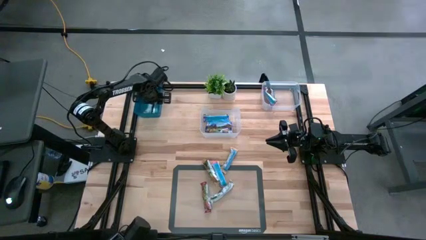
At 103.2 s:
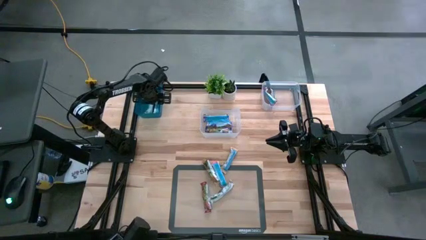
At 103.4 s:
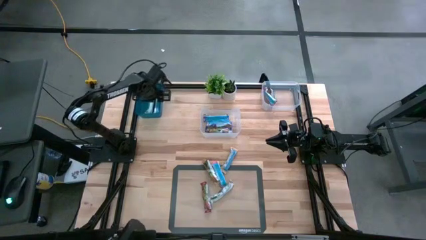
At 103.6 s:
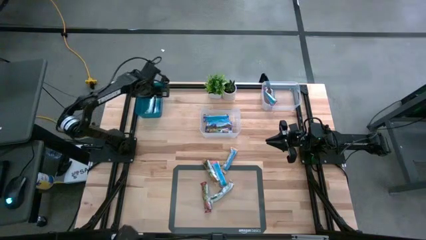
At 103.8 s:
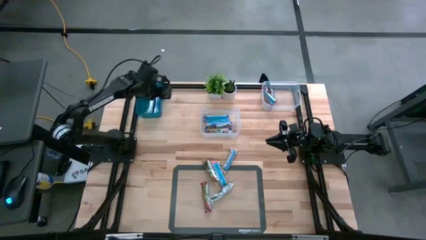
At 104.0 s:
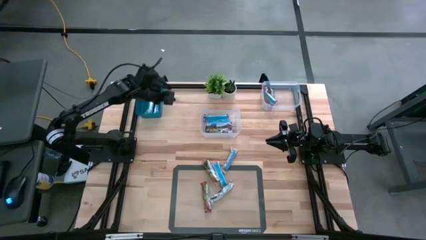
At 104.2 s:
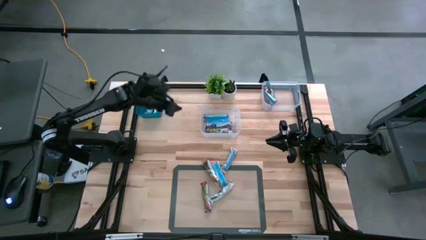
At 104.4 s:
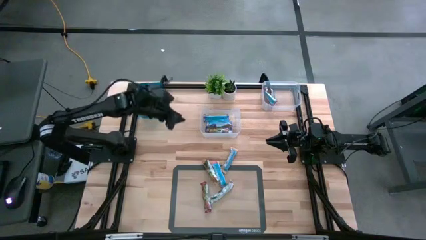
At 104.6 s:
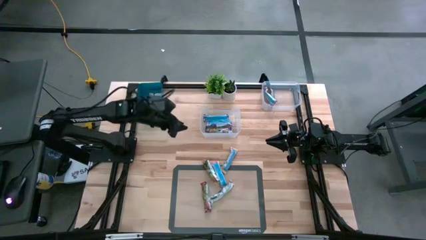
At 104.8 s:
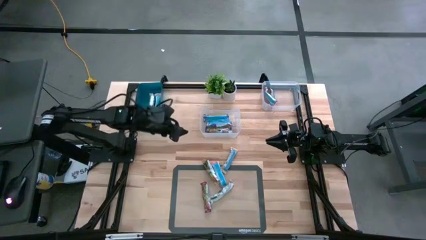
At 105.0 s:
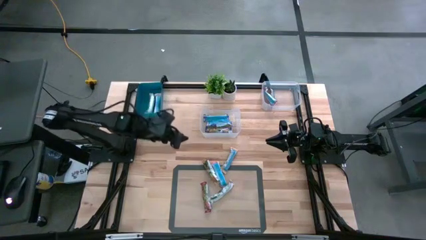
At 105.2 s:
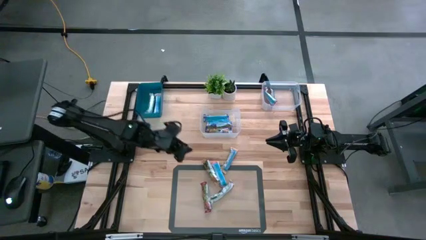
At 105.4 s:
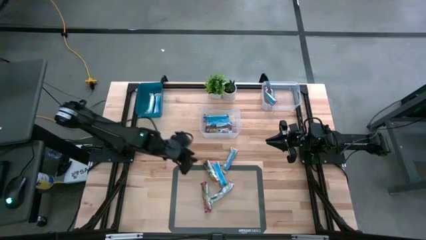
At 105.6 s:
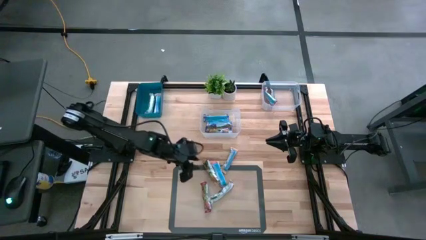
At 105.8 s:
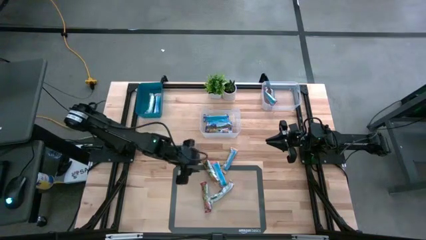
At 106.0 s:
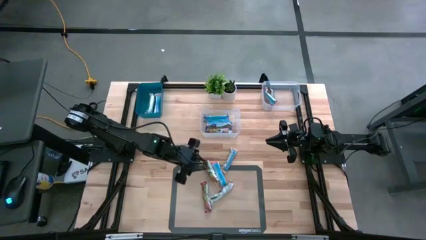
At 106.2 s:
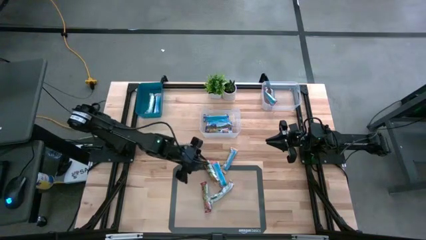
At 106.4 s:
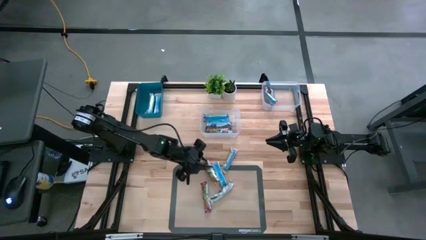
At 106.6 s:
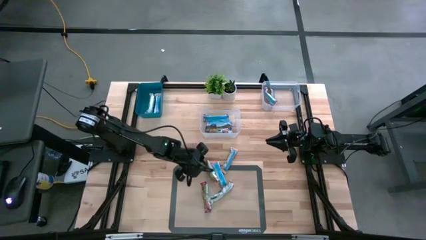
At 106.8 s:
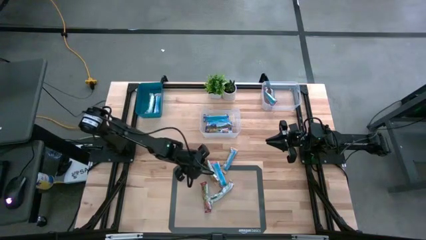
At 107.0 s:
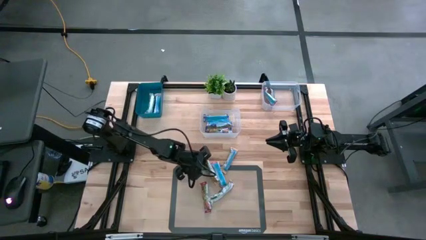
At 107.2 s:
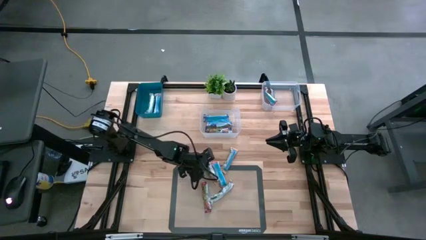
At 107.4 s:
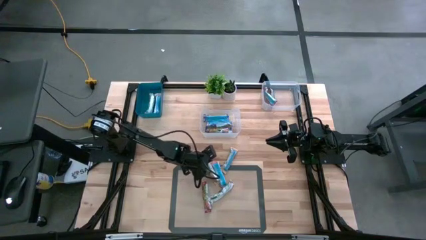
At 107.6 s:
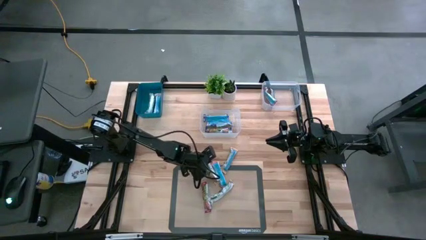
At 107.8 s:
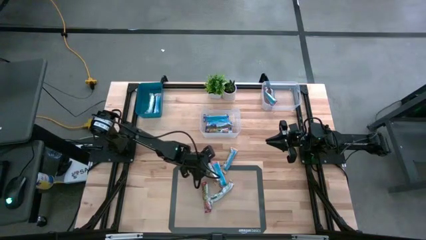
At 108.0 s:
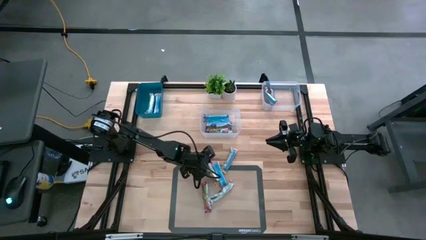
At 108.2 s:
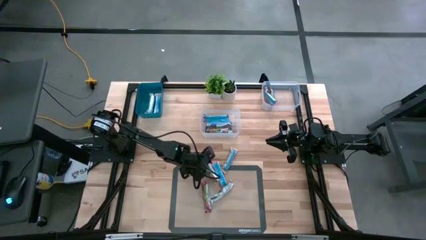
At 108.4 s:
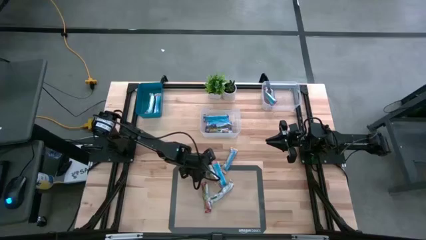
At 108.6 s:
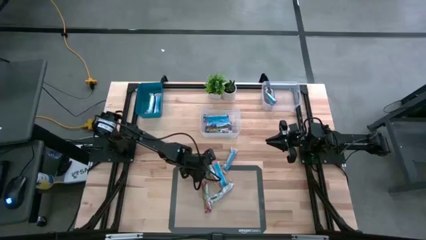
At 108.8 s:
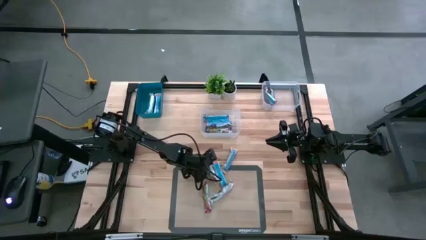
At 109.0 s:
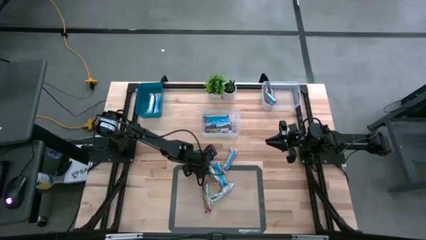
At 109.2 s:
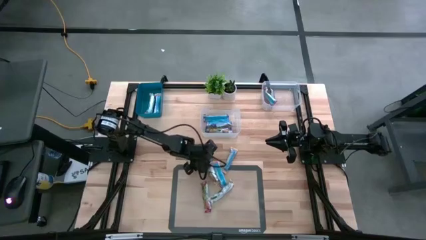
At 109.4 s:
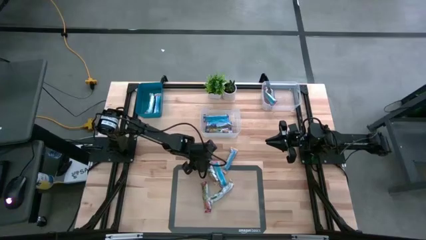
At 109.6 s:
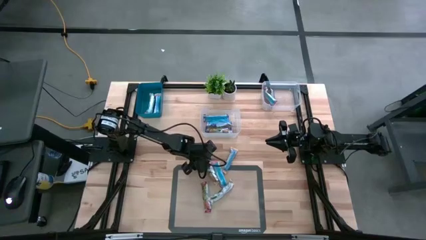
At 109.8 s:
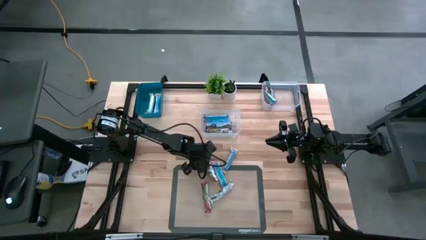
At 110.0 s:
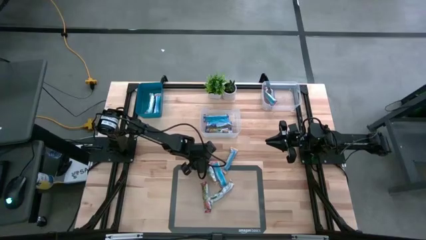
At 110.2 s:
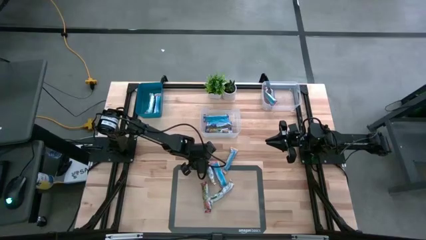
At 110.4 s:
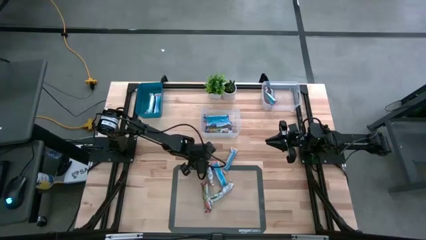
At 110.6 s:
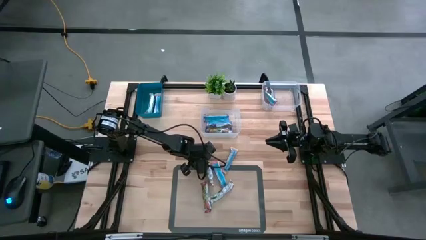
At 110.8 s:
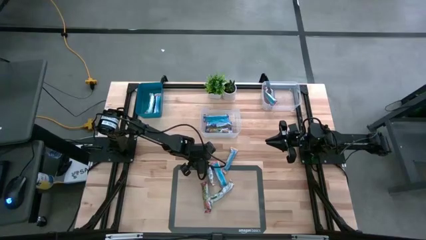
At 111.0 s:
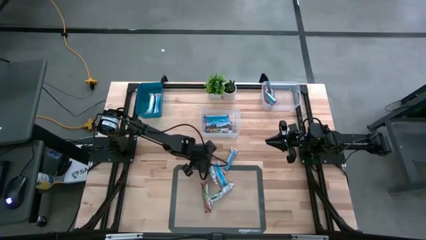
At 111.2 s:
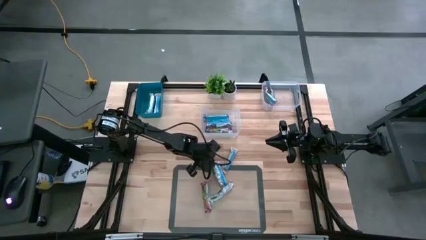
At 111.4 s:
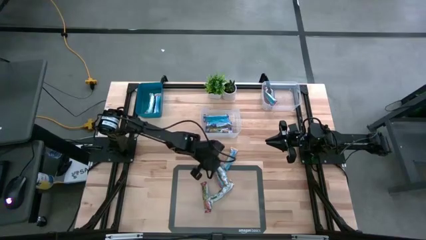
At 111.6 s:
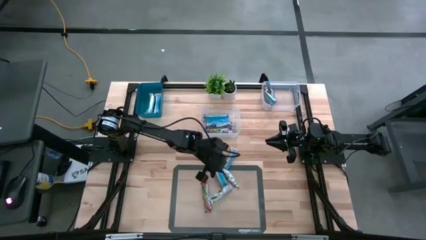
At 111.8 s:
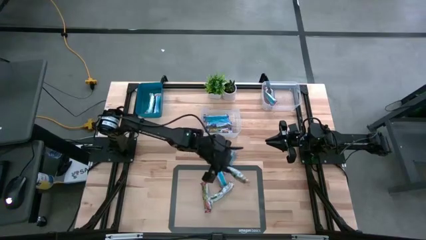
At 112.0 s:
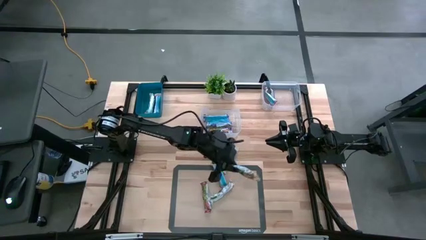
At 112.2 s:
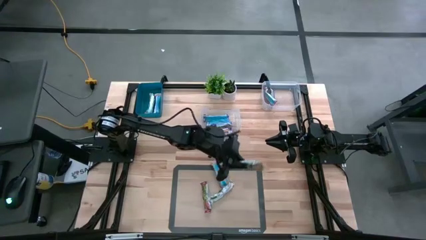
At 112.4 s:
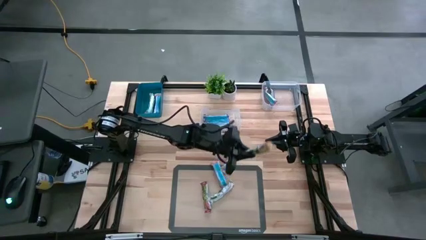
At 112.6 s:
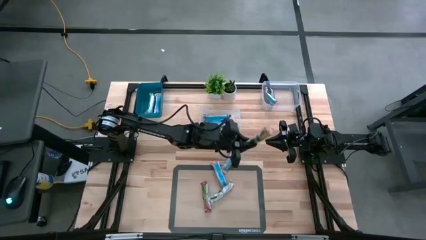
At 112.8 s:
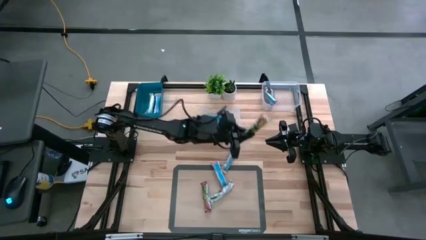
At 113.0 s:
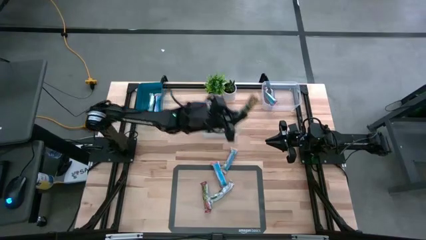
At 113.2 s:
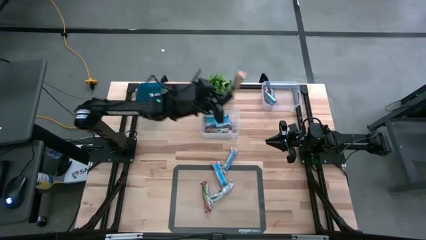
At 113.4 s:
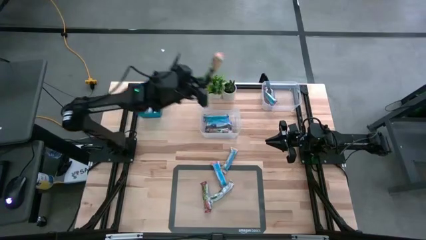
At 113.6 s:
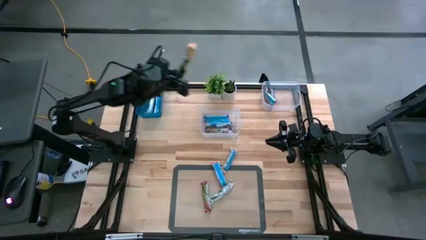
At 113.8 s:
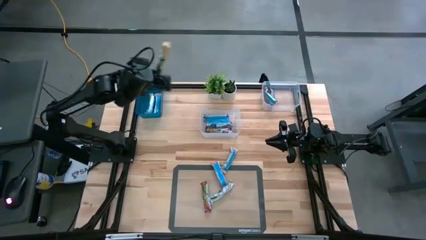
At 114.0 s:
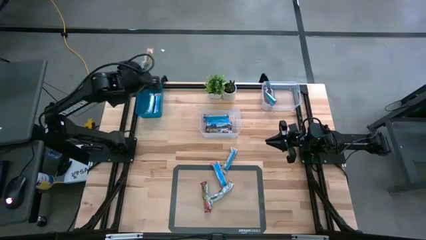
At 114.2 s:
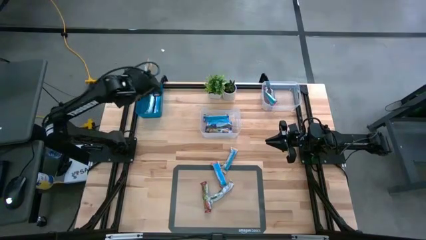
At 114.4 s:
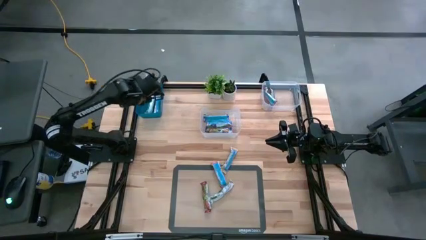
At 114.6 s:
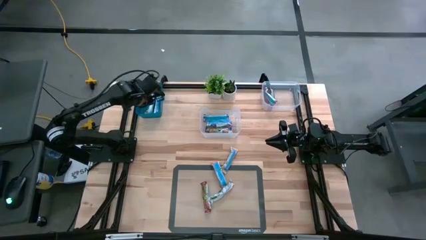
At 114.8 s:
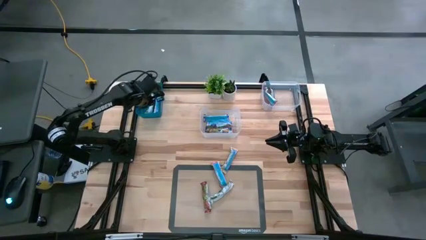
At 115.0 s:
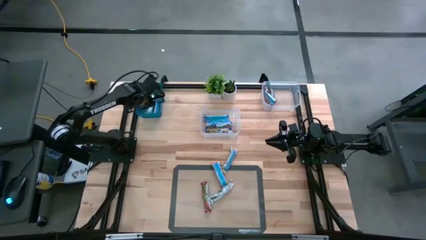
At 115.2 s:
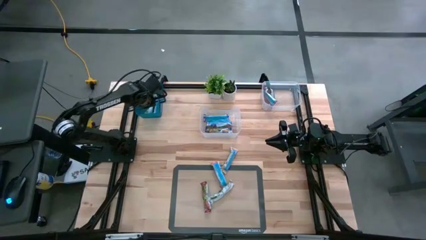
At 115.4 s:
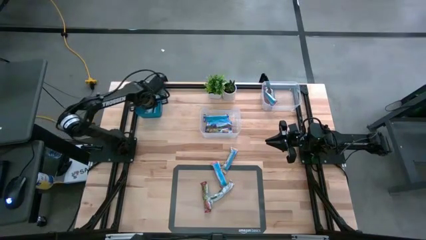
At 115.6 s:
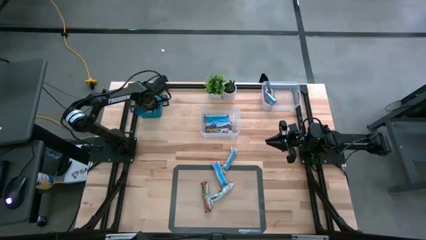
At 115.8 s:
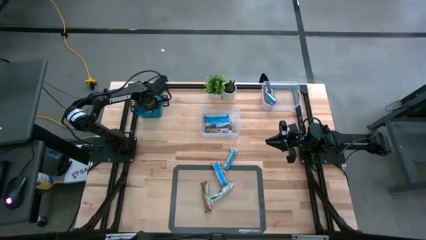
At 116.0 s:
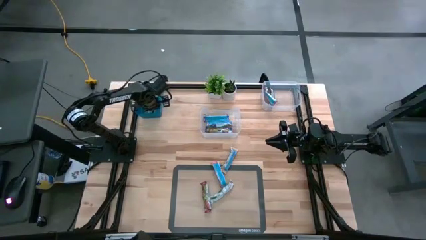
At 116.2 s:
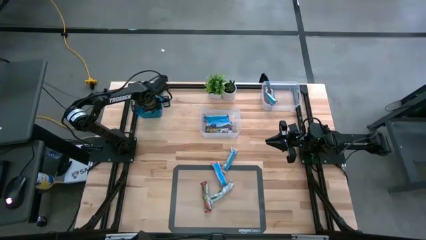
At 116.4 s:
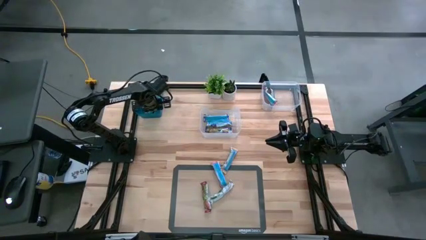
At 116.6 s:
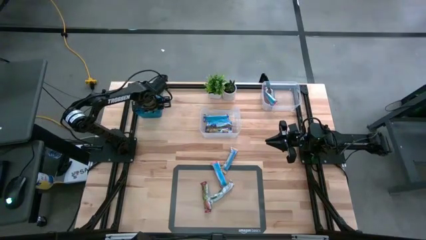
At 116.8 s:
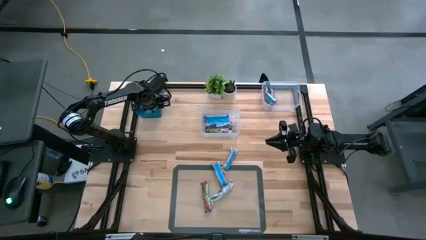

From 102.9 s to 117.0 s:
Task: Pick and place Granola Bars by type
Put the orange granola bar in the blue bin
